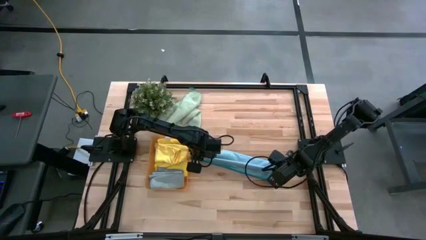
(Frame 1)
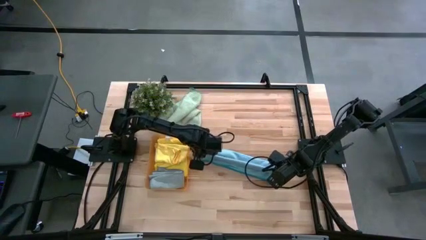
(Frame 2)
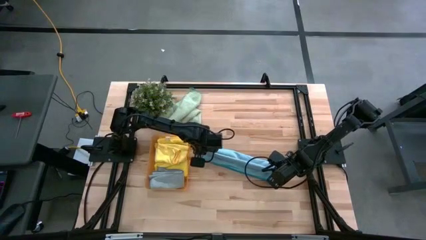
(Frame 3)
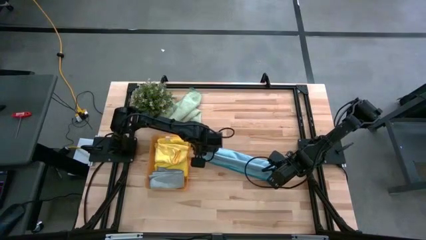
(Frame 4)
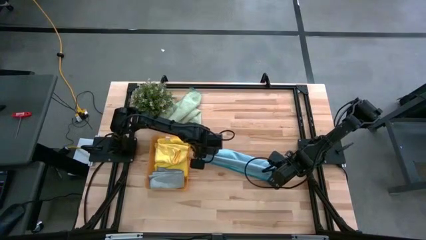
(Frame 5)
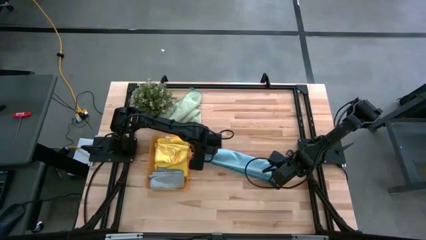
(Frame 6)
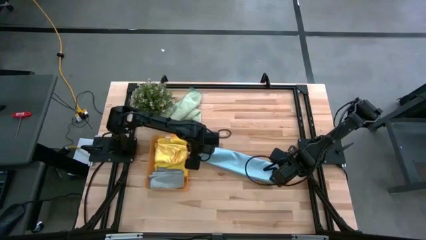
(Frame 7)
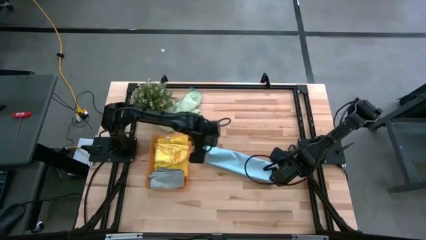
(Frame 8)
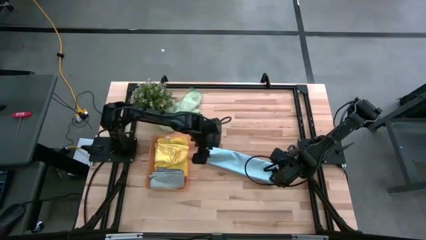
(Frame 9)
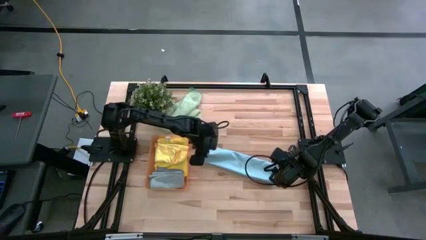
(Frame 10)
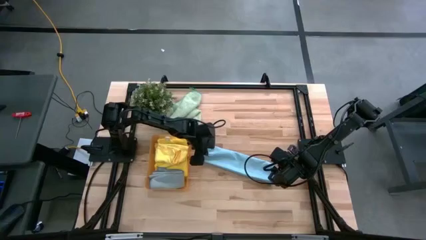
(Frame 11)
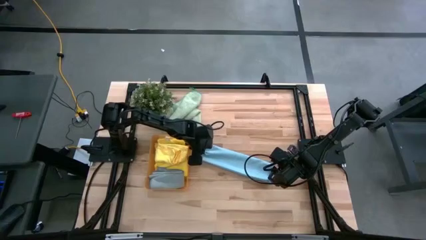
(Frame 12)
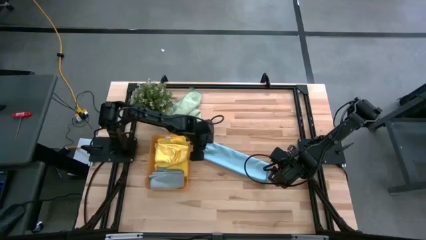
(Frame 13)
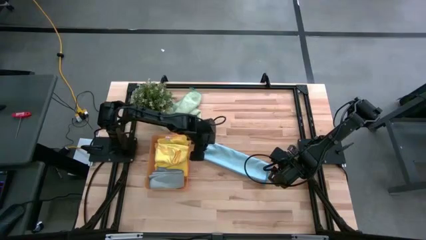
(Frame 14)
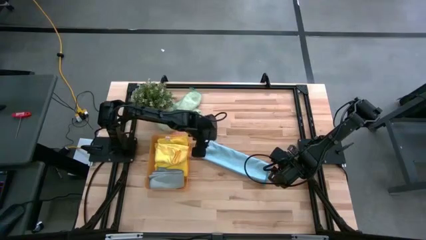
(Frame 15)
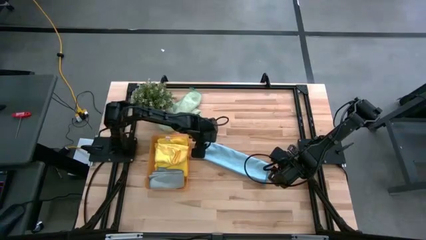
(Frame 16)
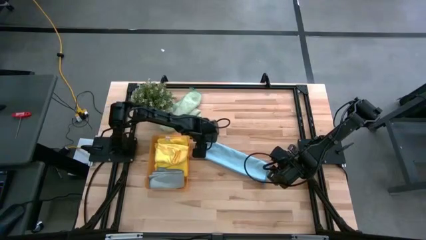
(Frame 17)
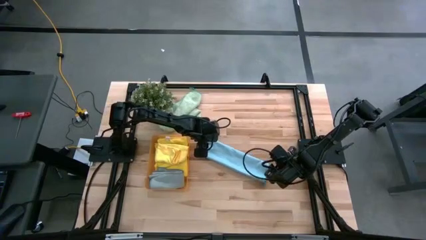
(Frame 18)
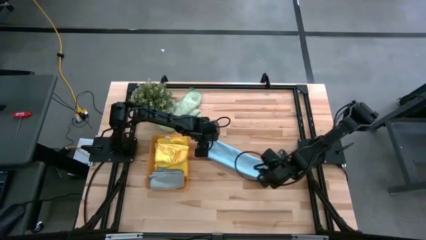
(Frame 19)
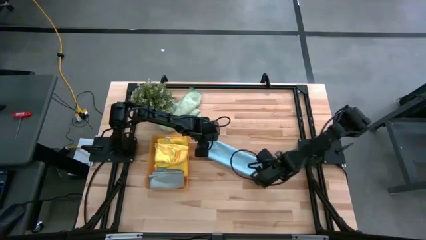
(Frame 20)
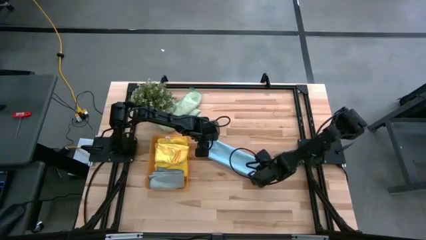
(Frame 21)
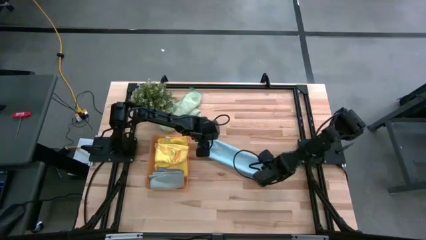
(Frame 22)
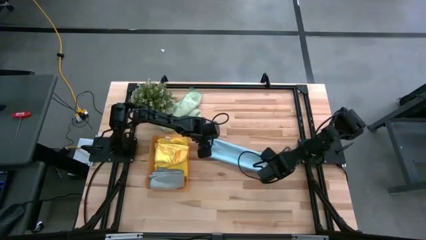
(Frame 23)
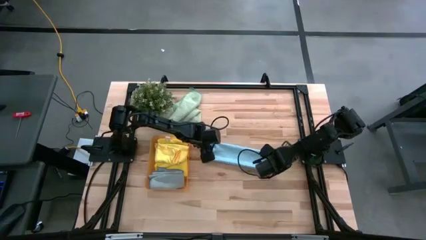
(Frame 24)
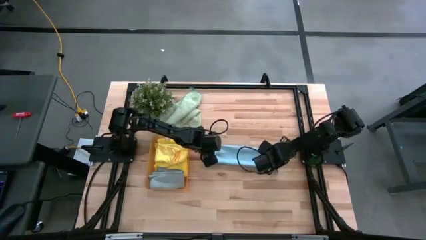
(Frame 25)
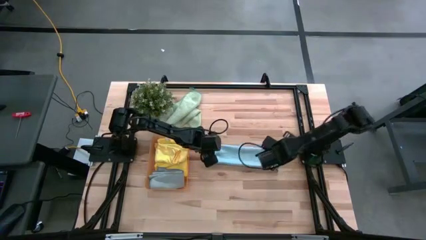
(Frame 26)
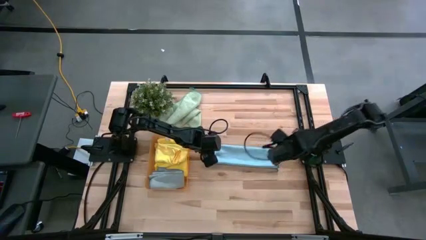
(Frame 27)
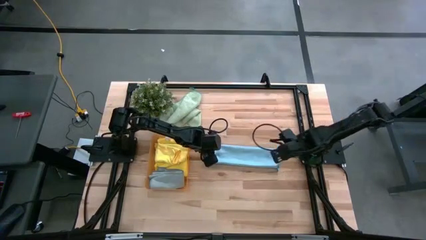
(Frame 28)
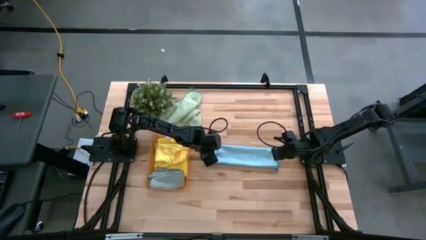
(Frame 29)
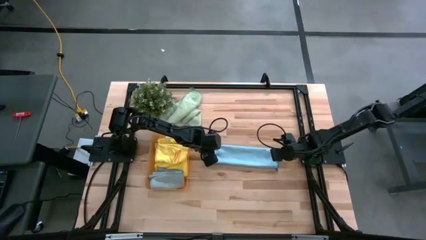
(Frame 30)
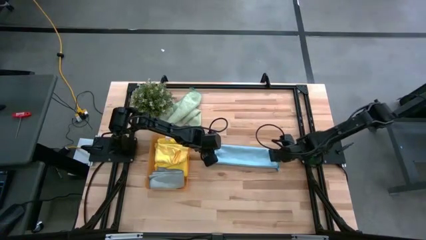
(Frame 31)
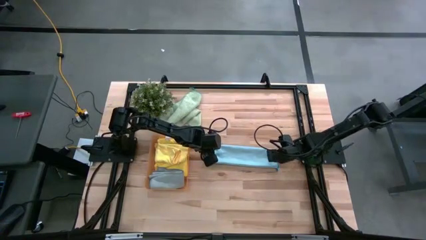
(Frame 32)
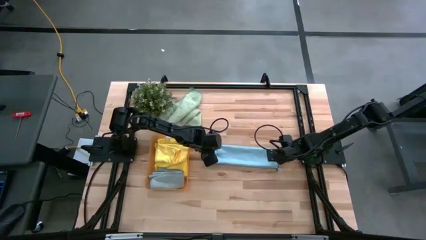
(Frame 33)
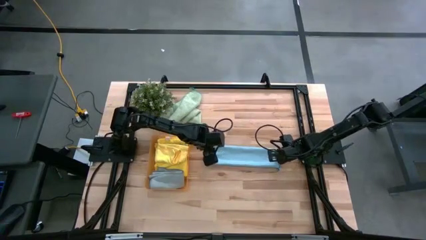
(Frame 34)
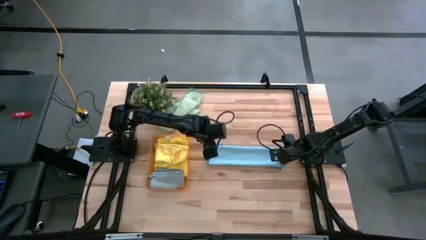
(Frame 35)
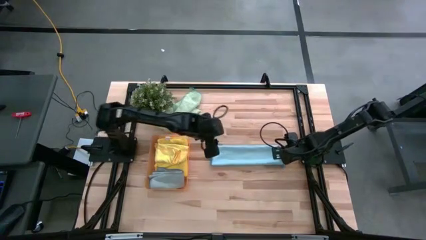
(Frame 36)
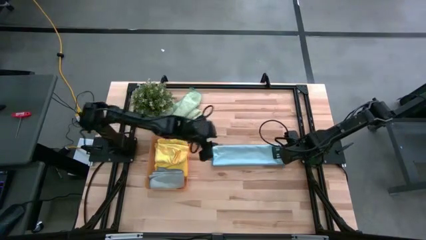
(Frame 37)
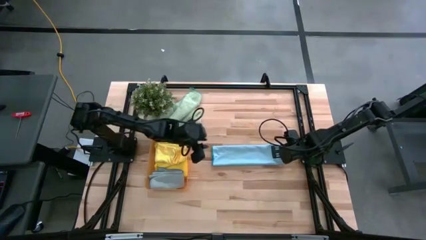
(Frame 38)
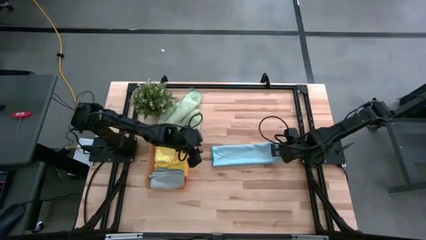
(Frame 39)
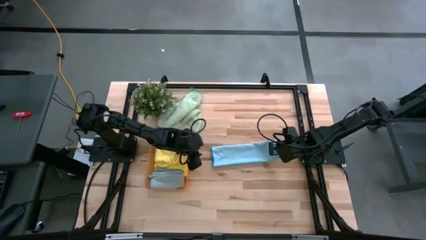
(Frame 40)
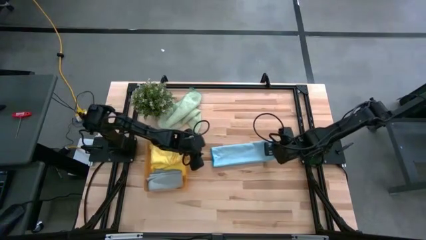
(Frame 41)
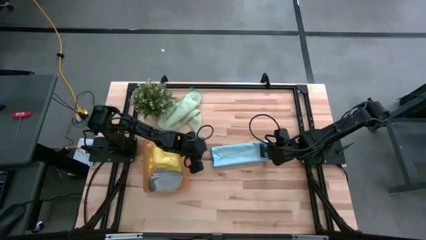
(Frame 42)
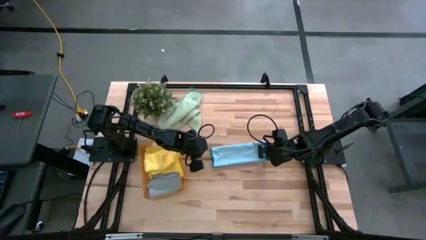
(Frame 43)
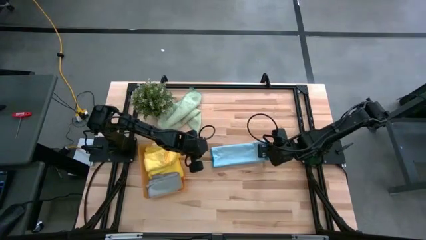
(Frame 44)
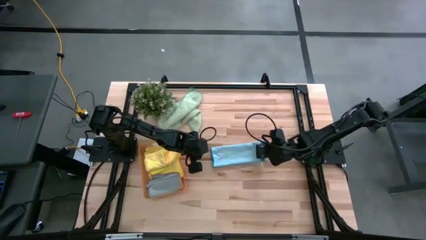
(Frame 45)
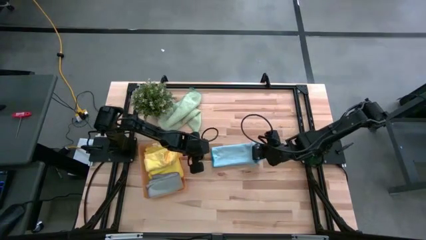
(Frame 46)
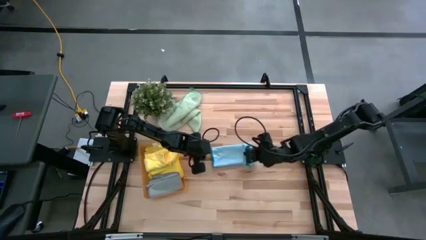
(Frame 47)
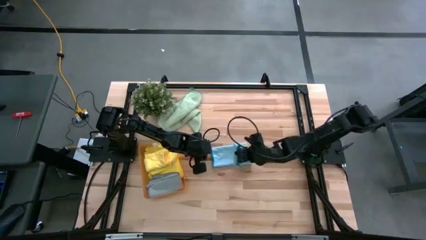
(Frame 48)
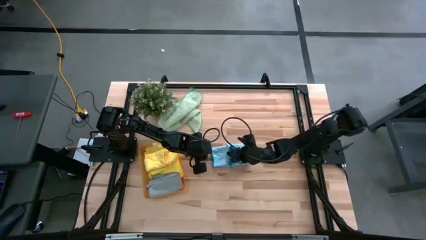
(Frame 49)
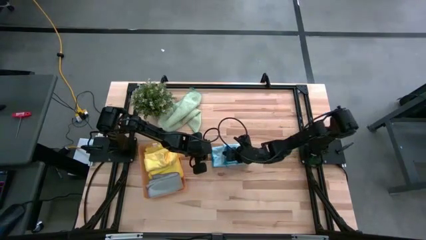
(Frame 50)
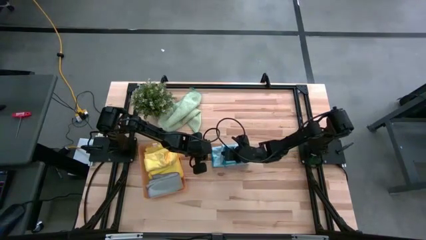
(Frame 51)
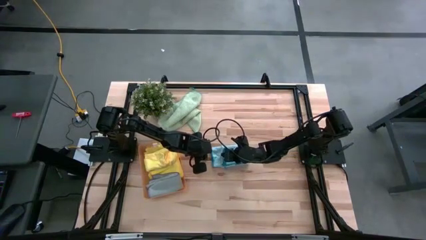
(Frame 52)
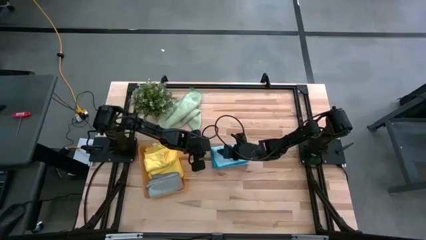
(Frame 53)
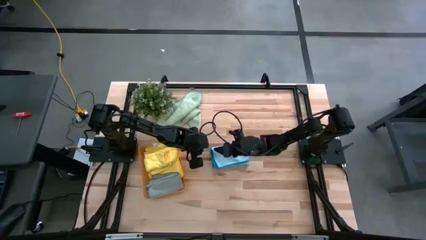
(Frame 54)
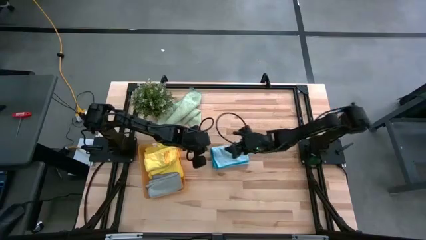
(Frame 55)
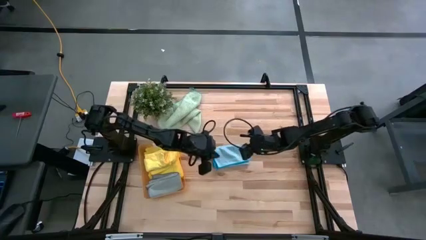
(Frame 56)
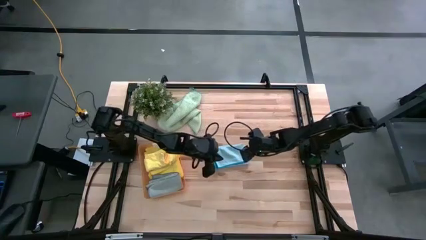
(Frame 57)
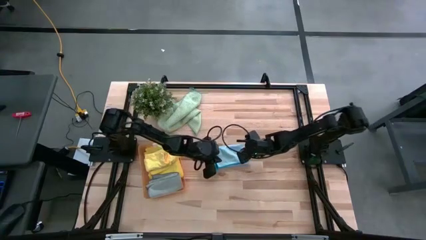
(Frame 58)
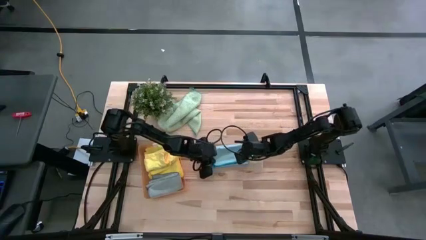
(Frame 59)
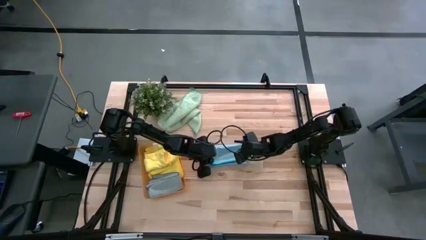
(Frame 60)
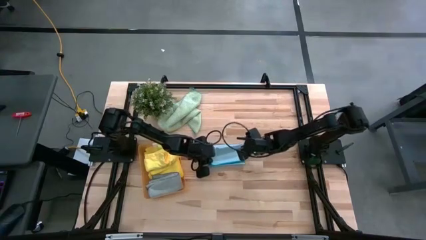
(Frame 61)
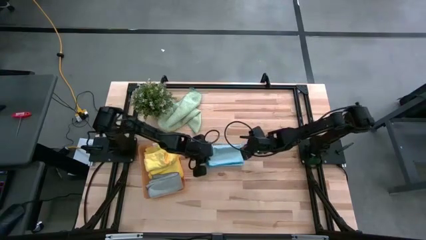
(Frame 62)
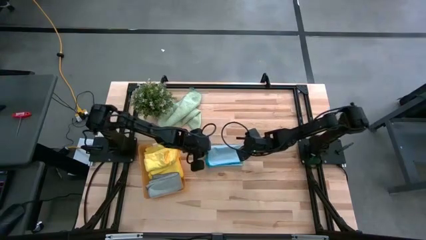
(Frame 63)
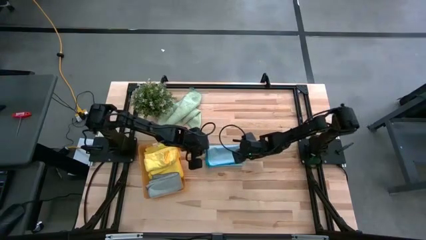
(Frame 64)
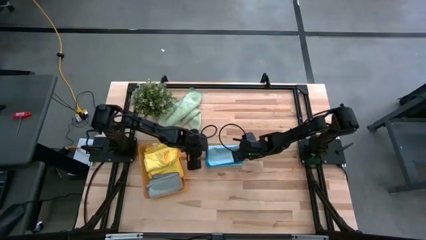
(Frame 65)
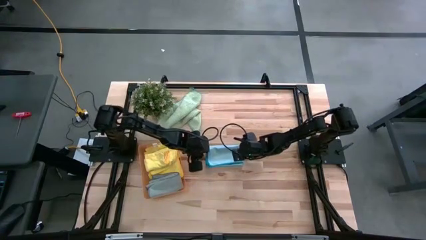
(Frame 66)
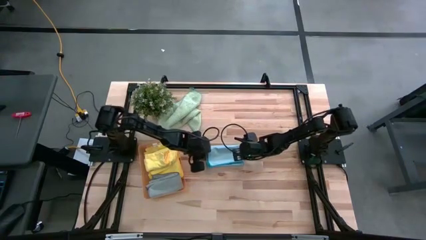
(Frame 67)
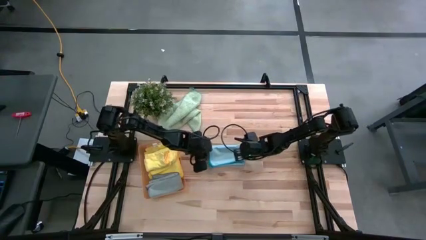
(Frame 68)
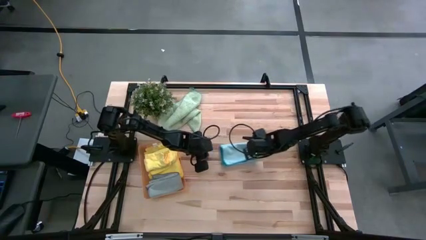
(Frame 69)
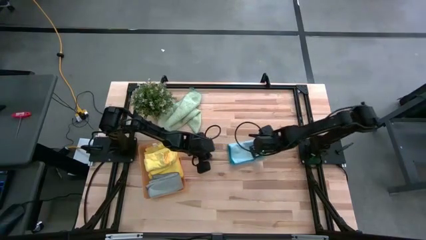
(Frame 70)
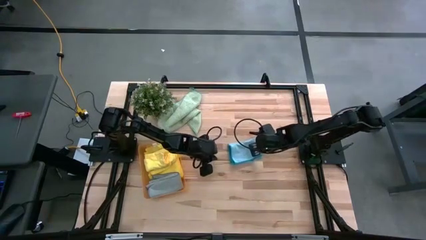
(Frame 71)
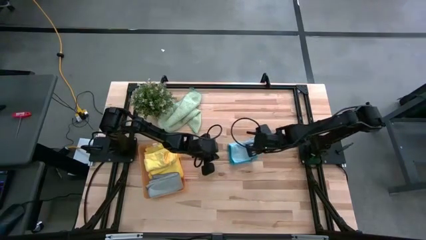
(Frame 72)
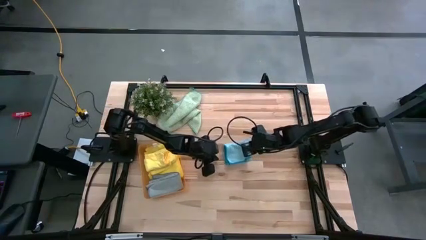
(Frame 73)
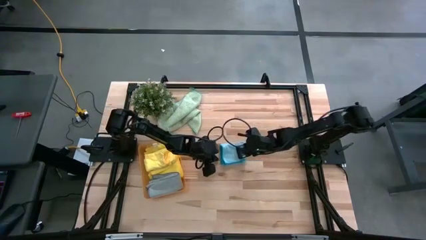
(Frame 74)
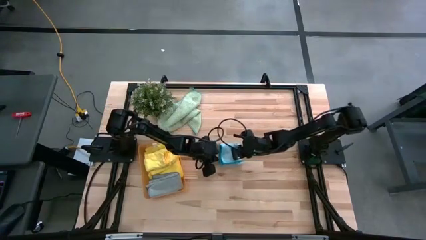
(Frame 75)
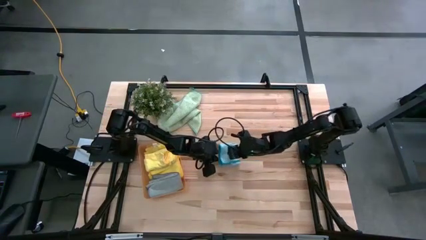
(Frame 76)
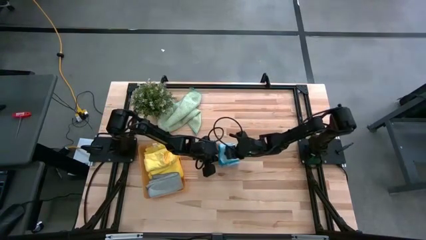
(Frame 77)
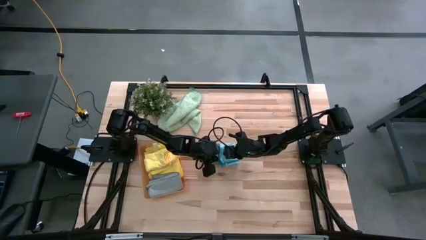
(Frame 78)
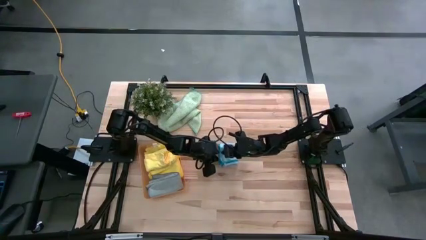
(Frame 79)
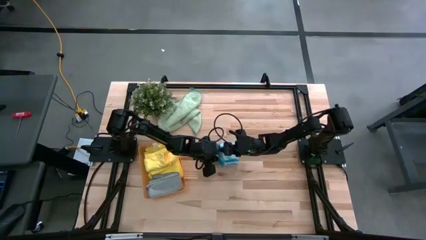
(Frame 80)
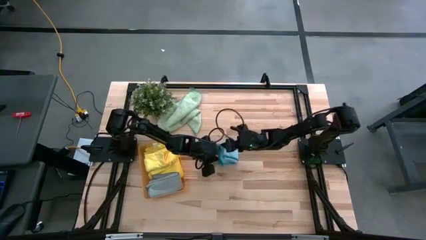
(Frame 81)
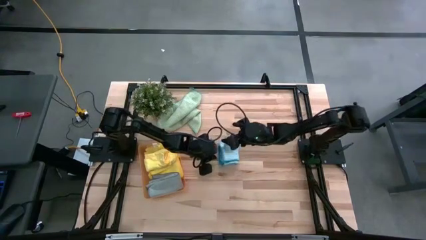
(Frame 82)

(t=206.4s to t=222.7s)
Task: Fold microfiber towels
Fold the blue microfiber towel
